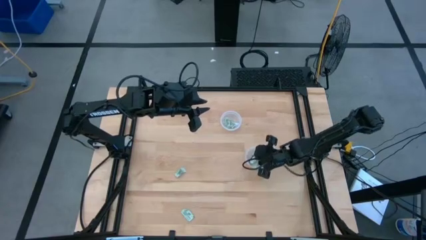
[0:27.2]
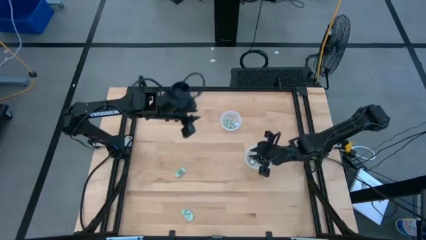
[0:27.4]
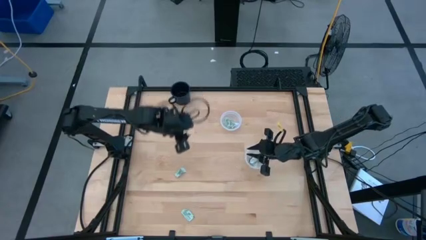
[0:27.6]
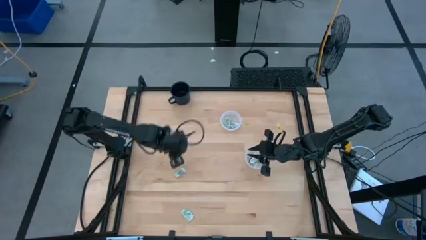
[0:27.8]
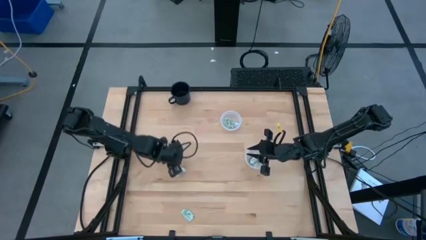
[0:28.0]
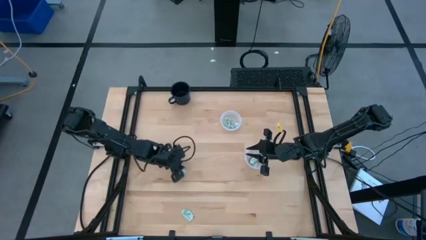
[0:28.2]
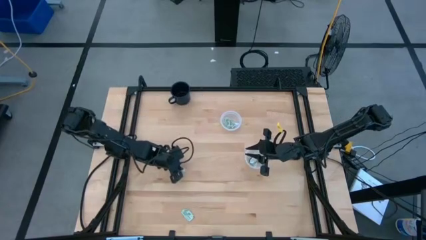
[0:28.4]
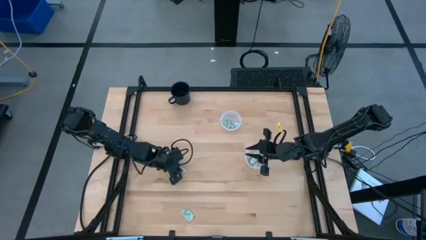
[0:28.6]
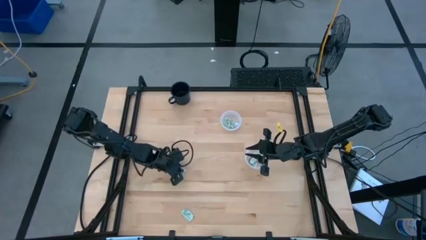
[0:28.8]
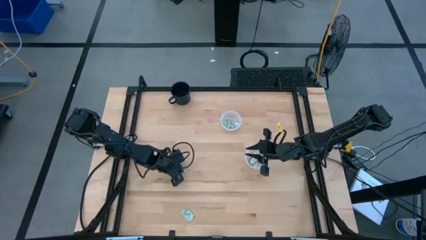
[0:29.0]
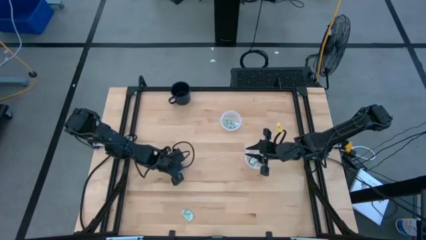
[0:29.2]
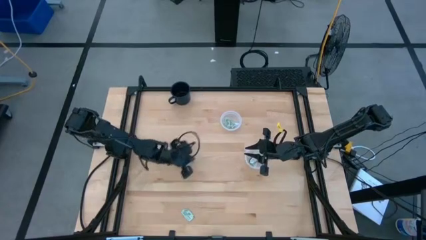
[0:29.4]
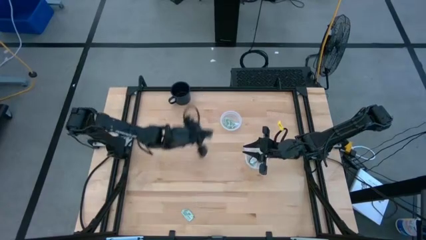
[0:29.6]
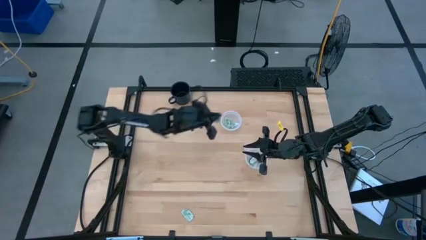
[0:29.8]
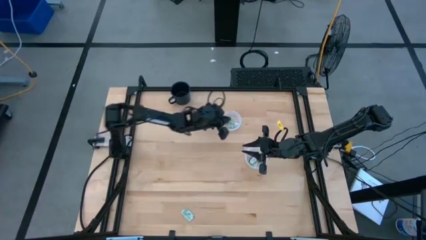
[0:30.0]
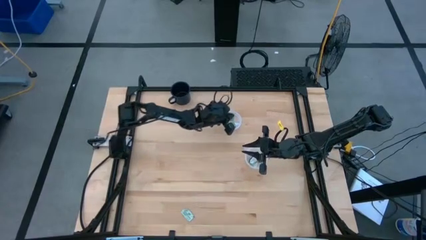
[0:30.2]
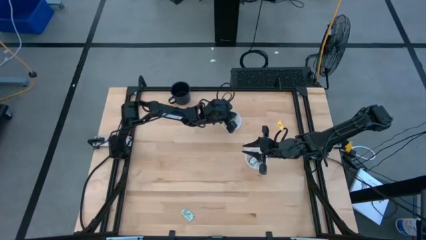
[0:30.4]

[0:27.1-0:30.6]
Task: Pick and place items into bin
Put the stevia packet into the top transparent bin

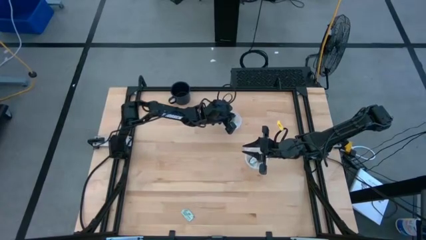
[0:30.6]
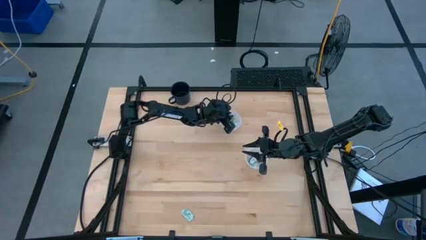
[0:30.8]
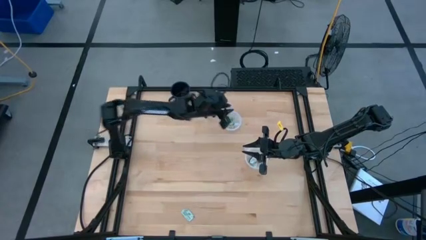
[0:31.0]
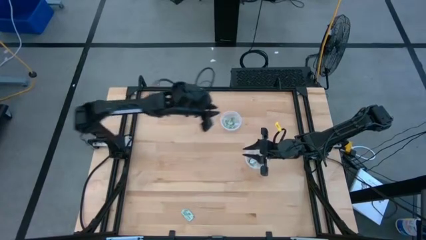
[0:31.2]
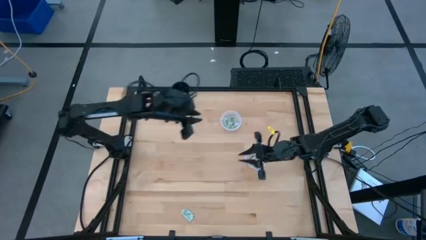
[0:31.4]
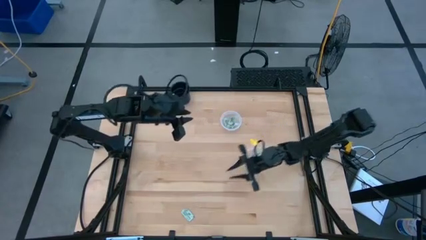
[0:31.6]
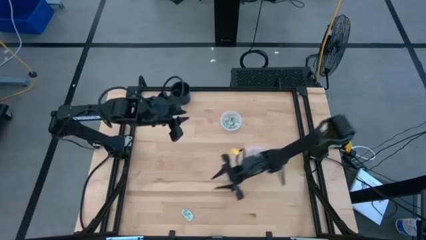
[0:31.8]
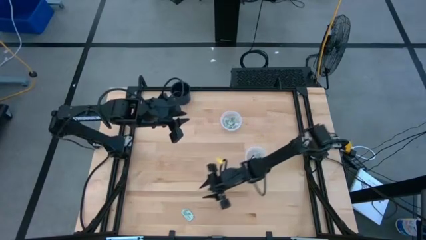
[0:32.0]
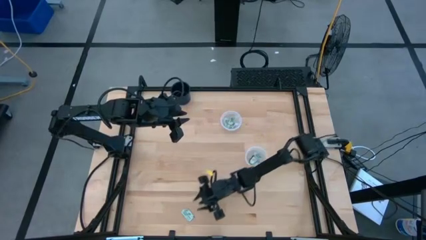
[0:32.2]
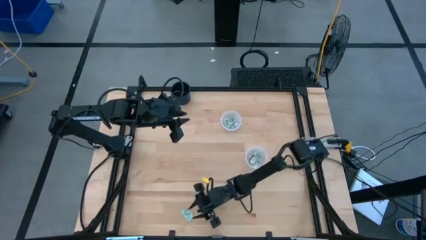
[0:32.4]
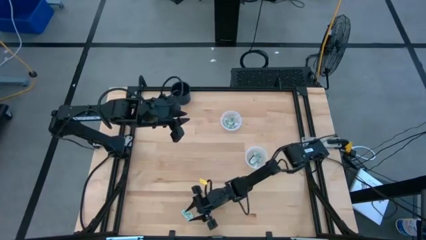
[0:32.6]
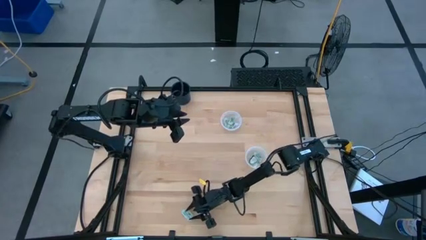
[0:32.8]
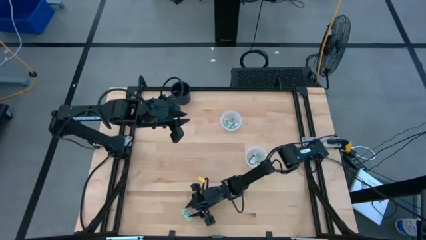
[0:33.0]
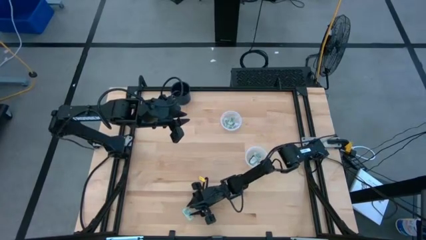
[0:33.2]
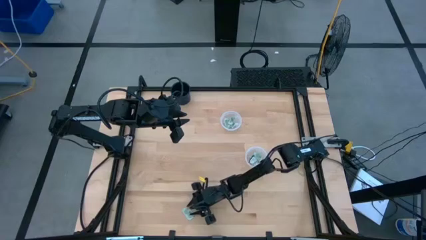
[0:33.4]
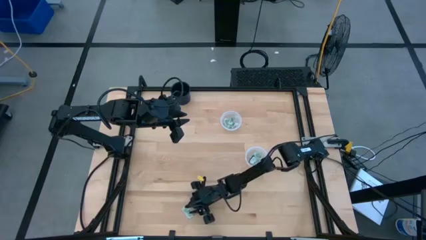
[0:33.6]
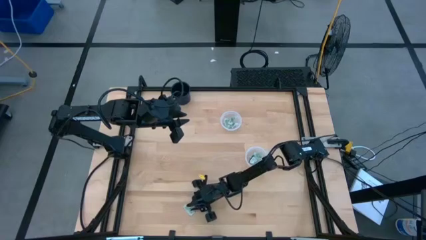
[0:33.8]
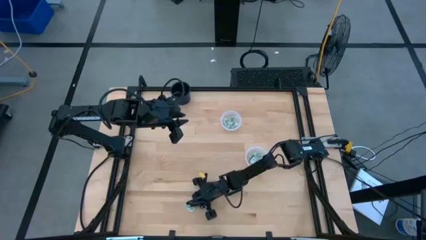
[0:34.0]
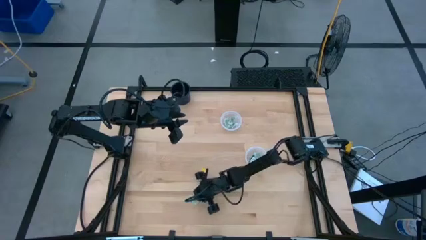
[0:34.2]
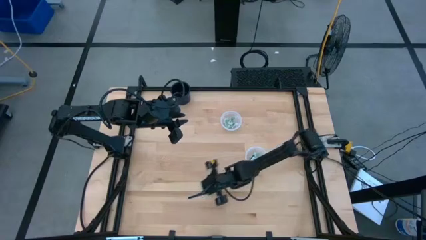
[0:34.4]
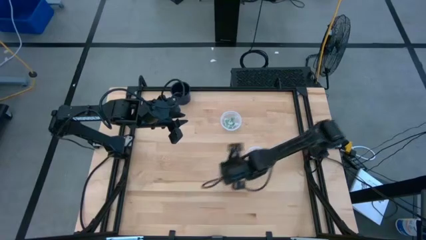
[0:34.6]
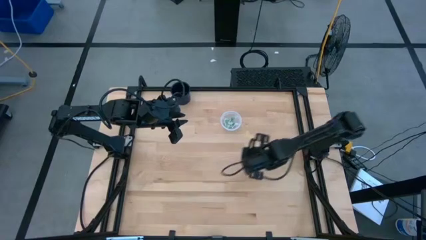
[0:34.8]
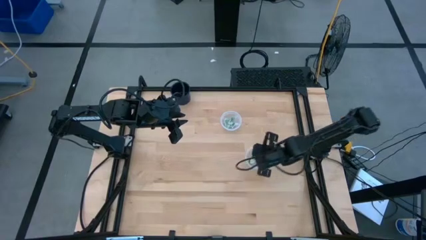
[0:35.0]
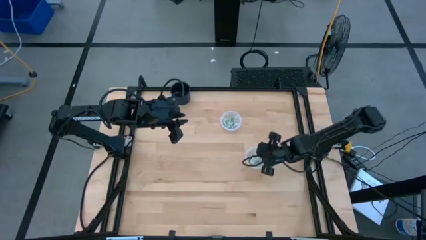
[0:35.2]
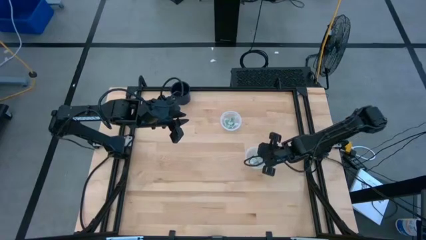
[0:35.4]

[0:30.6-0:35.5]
Put the stevia packet into the bottom transparent bin

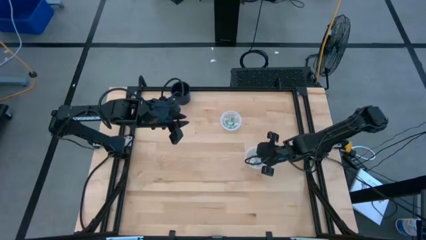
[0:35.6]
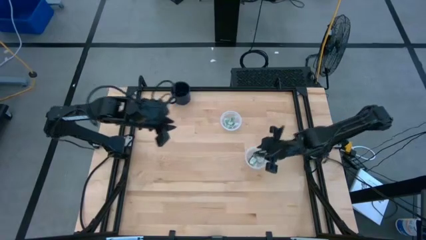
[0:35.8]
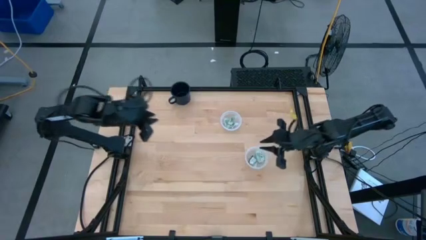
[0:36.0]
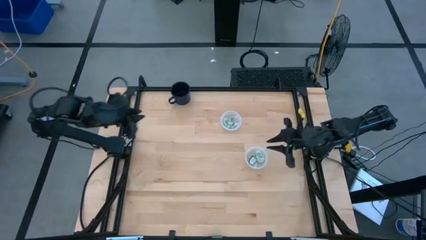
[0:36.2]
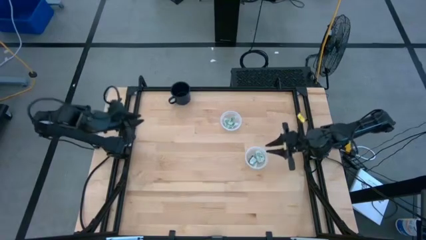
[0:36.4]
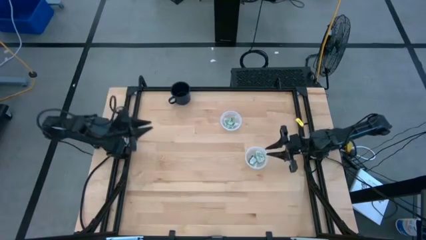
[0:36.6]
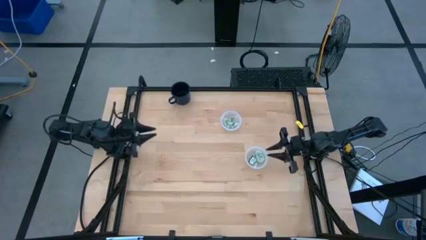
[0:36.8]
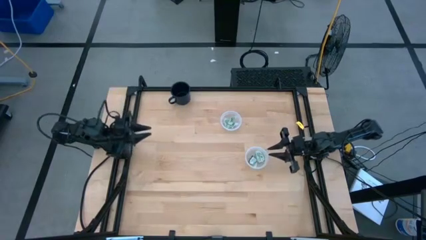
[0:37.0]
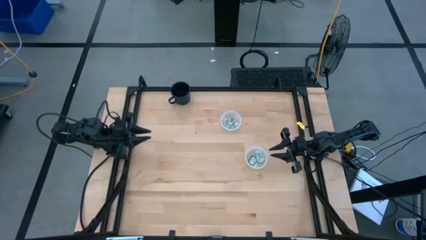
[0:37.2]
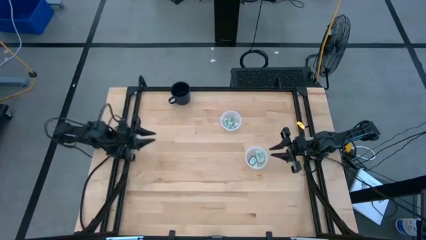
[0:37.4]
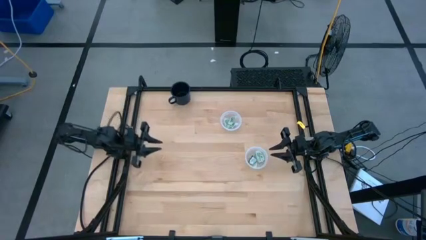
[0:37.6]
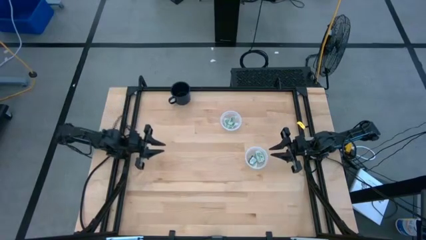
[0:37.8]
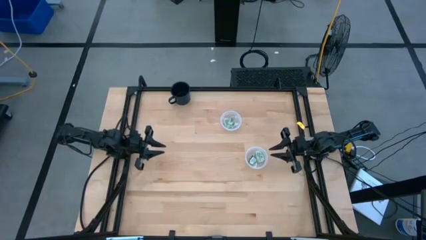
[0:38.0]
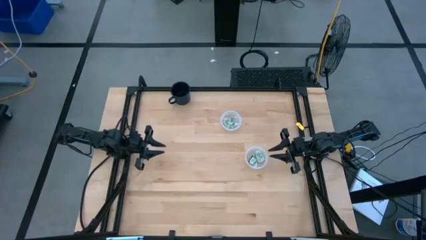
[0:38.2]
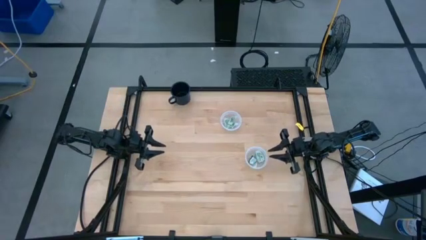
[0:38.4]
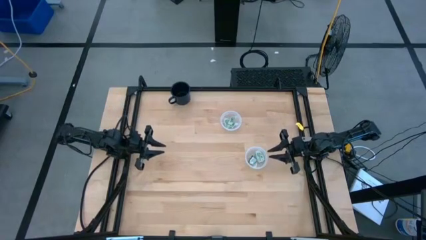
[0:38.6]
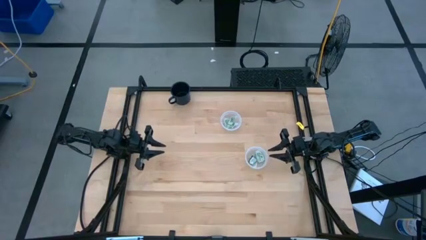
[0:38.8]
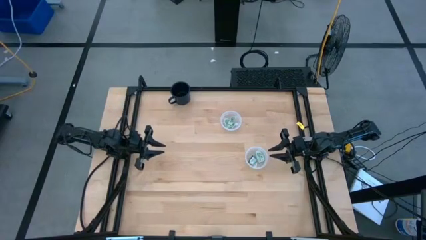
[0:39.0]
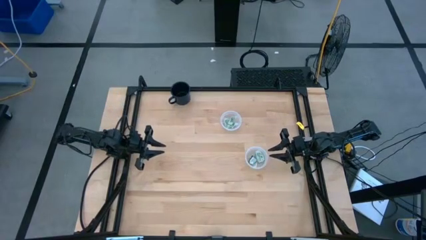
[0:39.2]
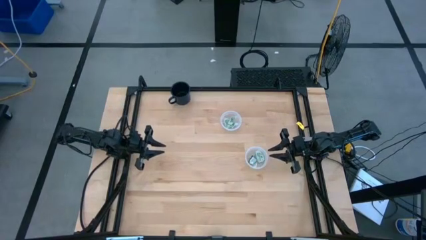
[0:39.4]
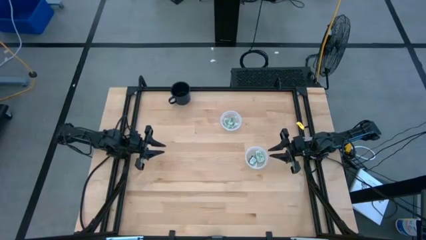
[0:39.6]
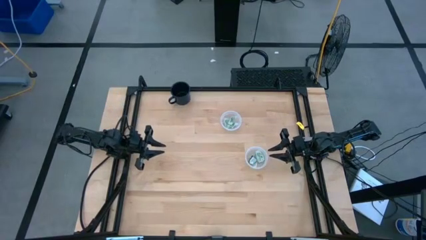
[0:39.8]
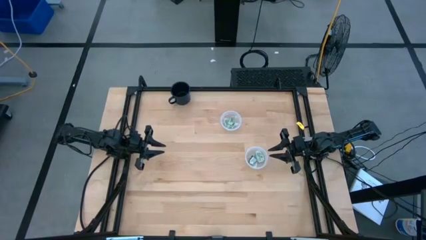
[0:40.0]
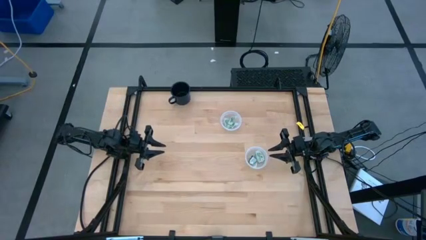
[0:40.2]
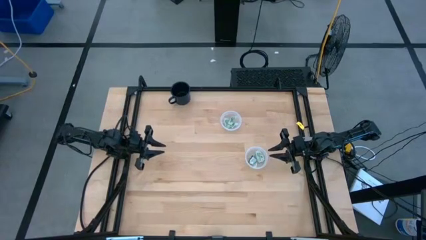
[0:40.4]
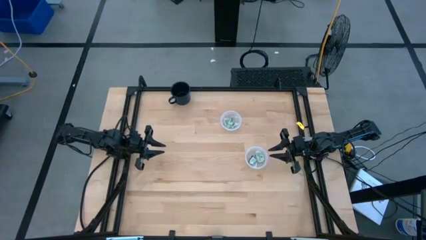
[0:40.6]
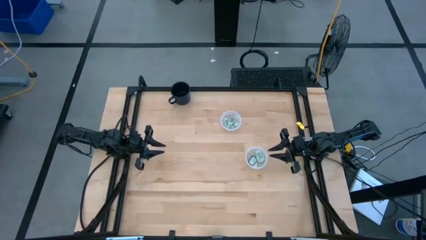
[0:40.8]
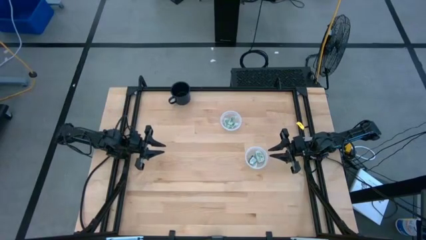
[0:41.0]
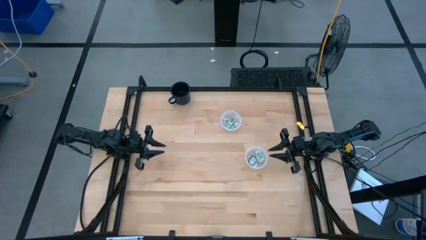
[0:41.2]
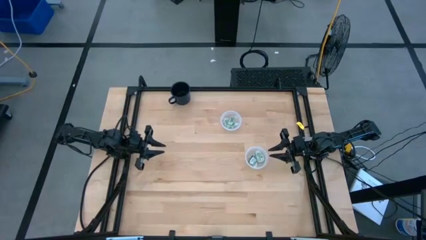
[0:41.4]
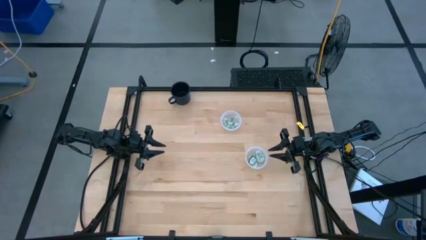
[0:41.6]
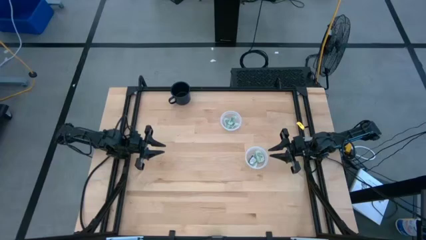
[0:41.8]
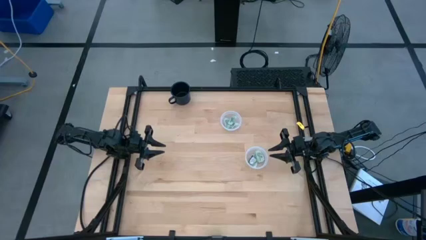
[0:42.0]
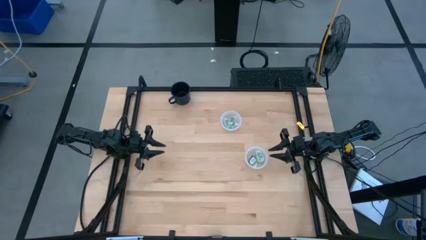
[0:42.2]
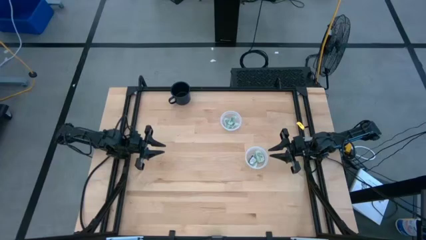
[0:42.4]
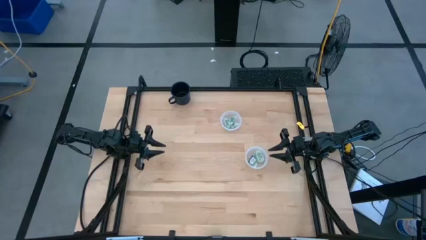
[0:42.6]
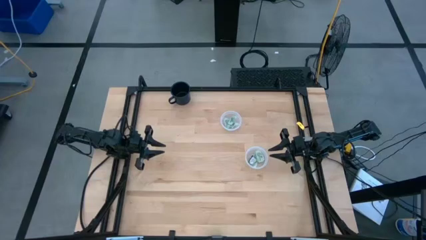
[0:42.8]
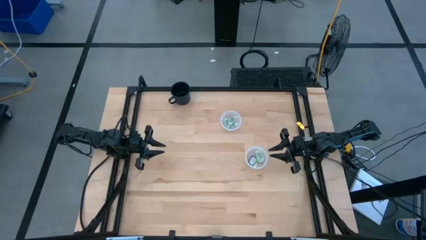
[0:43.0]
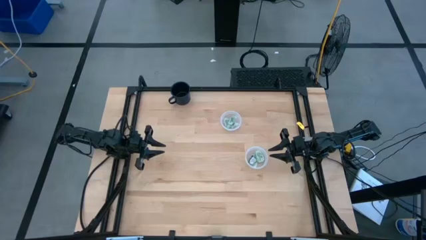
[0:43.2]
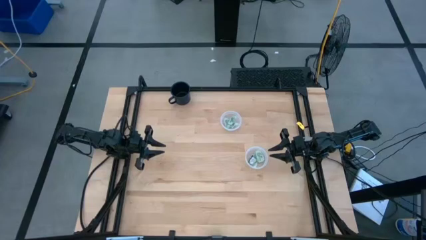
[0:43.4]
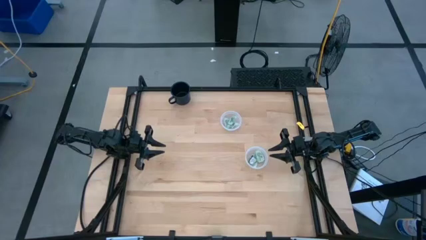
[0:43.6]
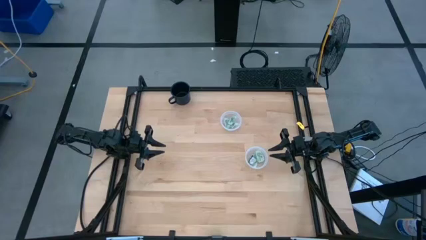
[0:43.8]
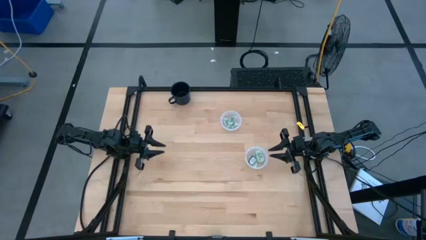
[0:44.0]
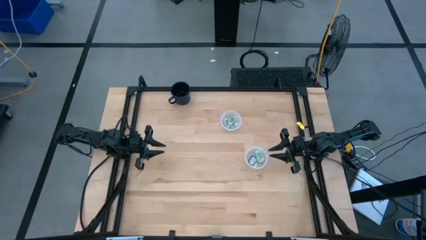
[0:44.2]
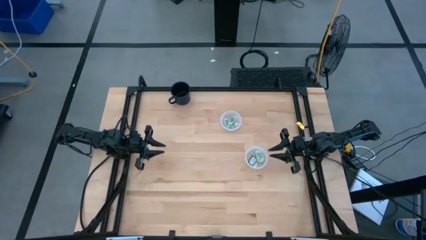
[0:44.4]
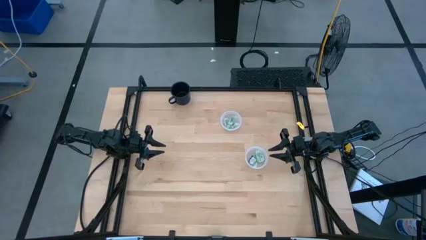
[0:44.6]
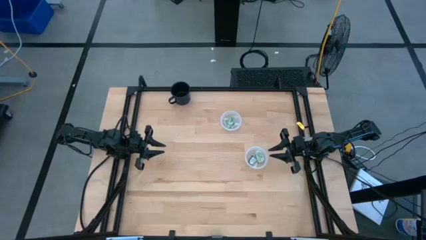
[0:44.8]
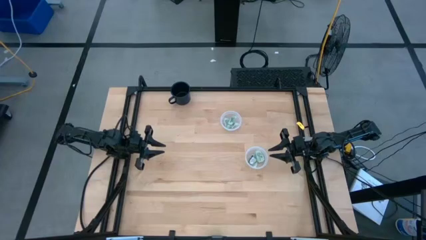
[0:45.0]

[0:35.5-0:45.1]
Return to Home Position
